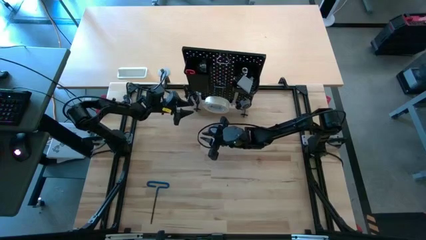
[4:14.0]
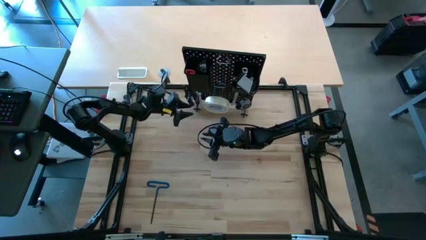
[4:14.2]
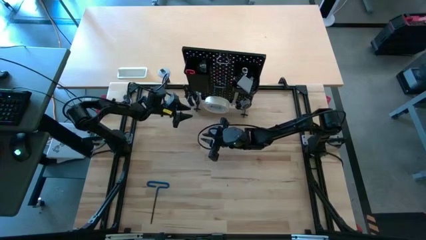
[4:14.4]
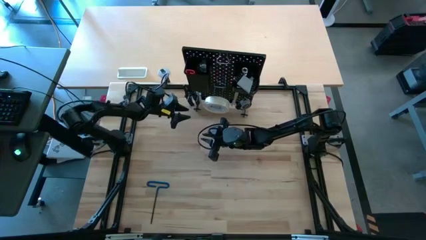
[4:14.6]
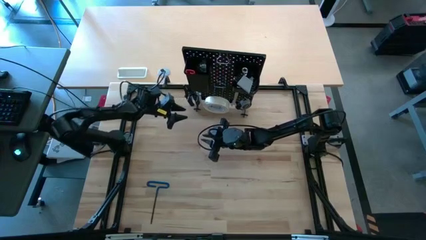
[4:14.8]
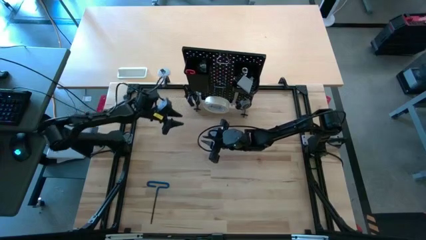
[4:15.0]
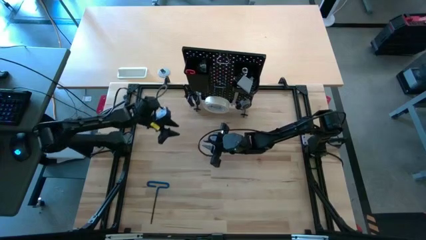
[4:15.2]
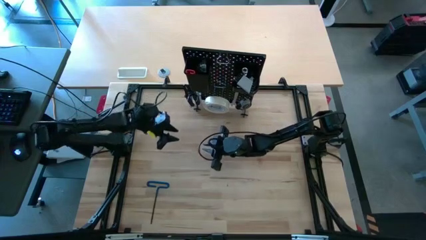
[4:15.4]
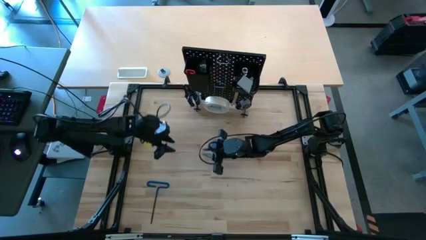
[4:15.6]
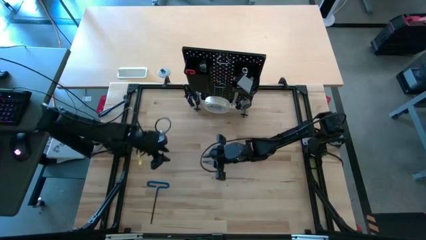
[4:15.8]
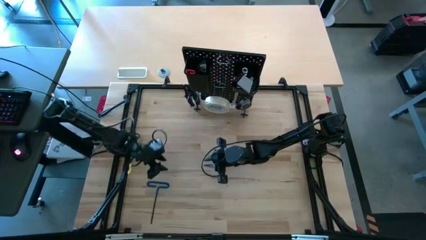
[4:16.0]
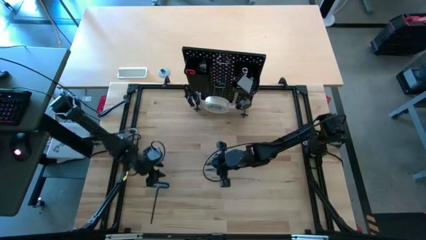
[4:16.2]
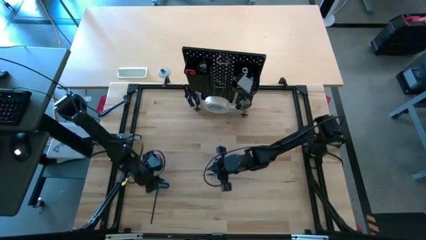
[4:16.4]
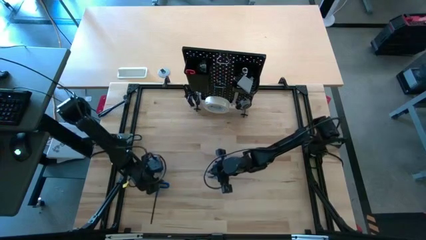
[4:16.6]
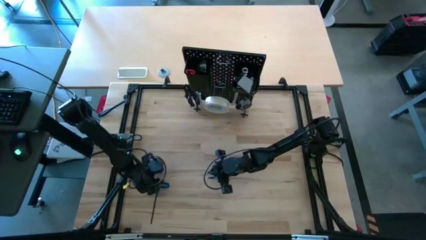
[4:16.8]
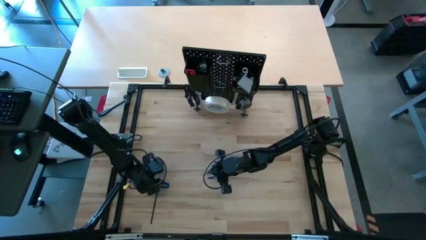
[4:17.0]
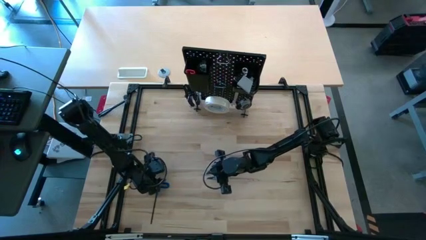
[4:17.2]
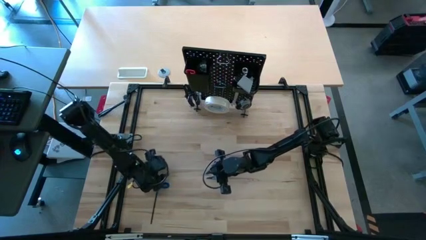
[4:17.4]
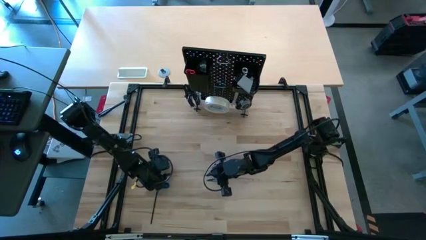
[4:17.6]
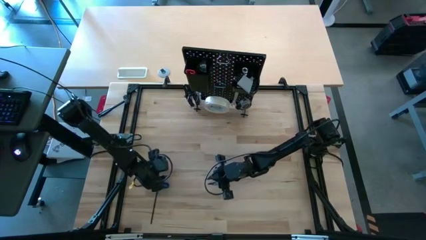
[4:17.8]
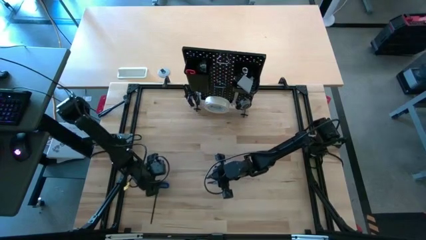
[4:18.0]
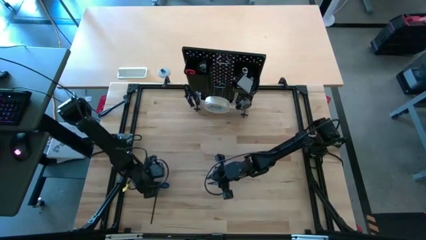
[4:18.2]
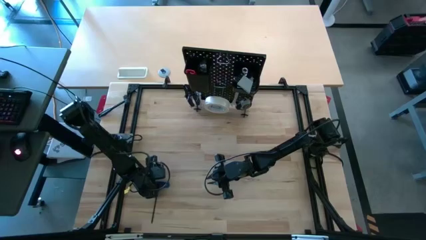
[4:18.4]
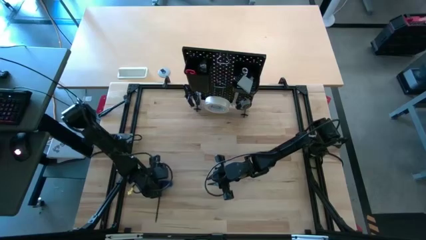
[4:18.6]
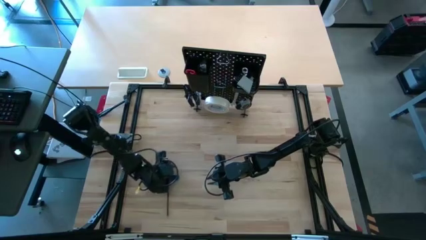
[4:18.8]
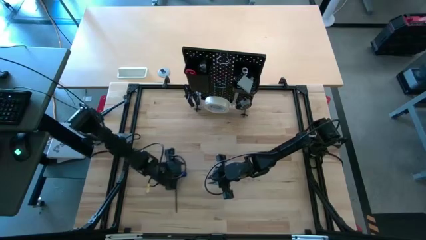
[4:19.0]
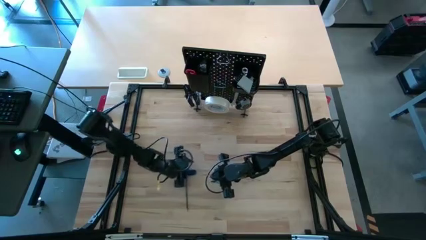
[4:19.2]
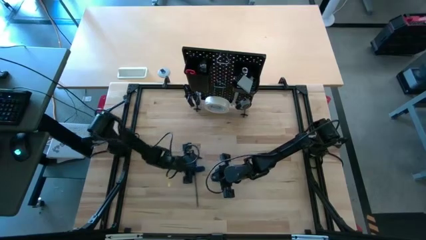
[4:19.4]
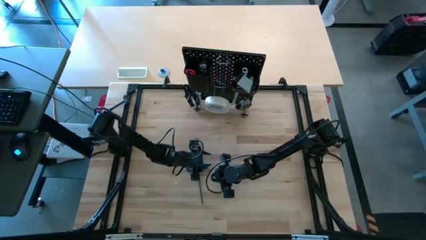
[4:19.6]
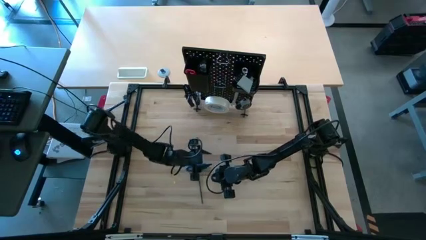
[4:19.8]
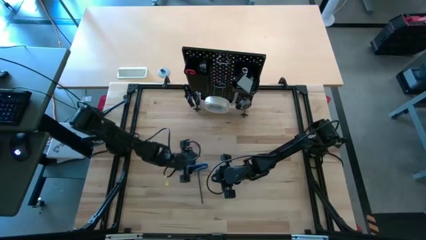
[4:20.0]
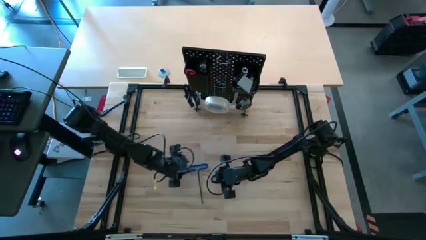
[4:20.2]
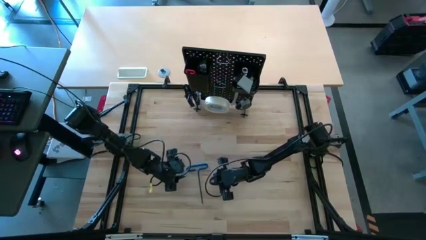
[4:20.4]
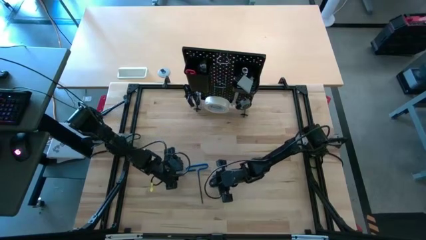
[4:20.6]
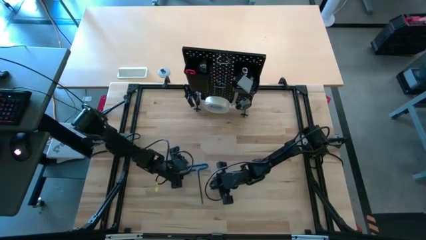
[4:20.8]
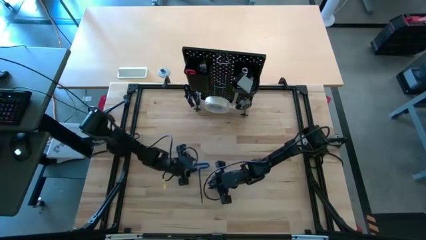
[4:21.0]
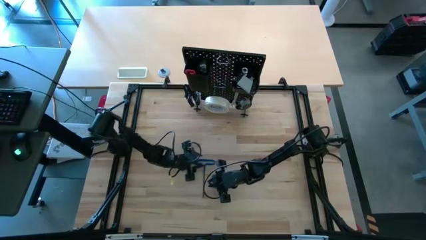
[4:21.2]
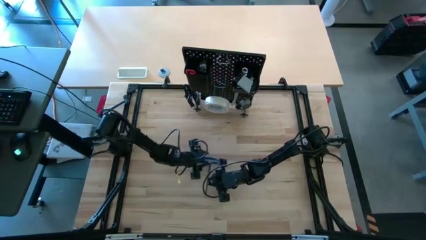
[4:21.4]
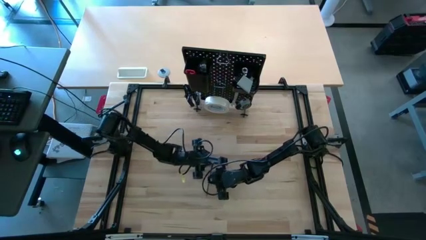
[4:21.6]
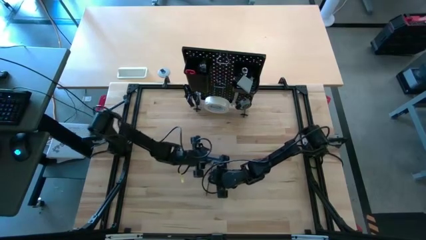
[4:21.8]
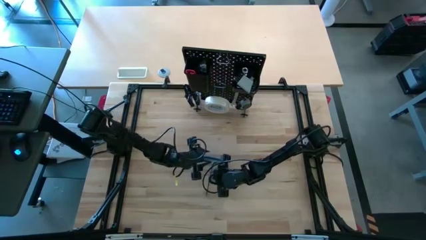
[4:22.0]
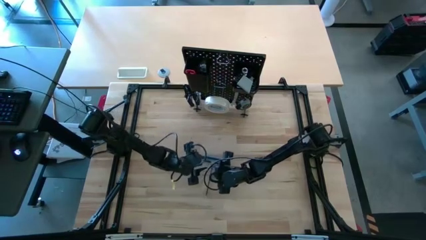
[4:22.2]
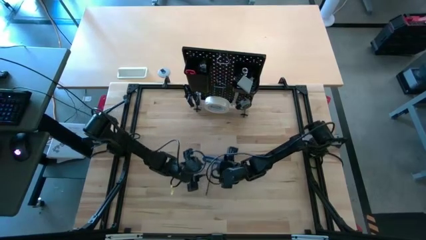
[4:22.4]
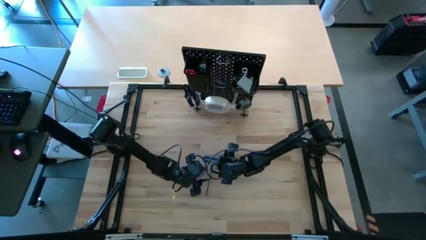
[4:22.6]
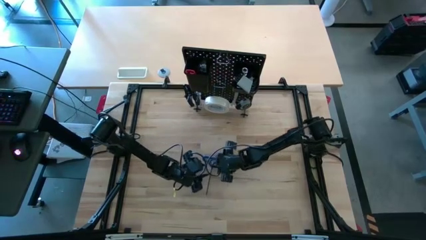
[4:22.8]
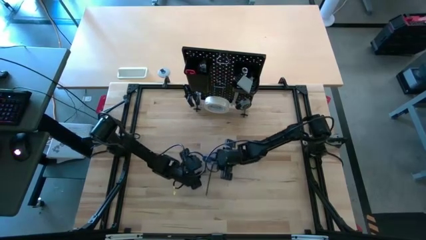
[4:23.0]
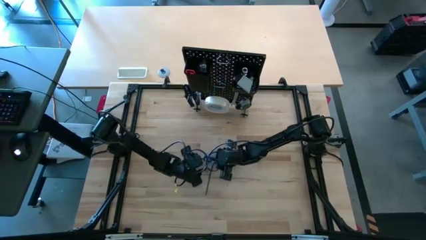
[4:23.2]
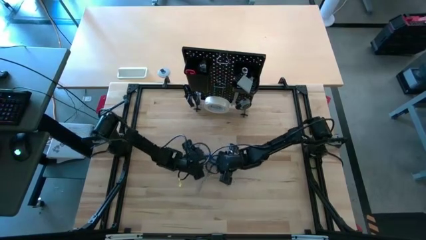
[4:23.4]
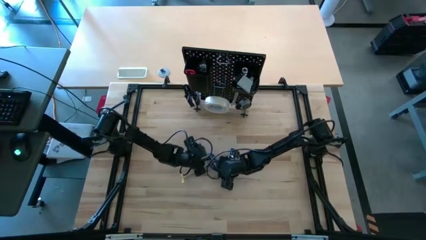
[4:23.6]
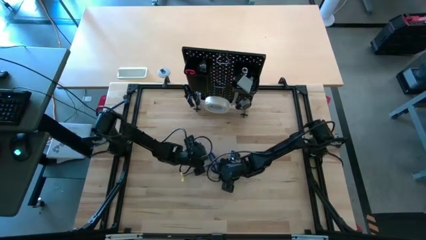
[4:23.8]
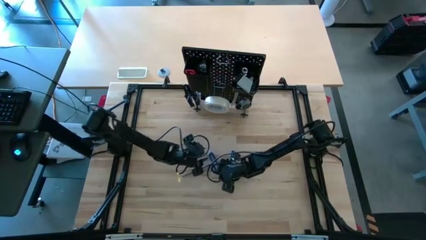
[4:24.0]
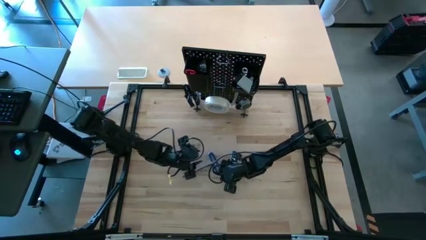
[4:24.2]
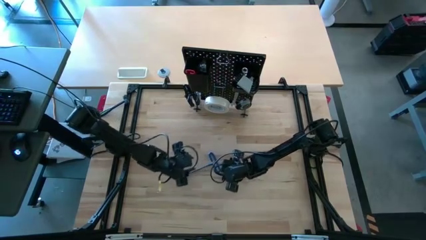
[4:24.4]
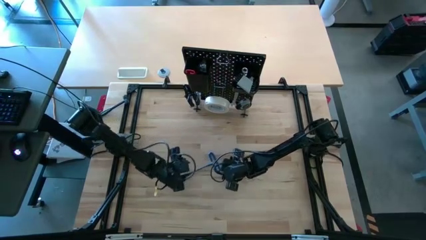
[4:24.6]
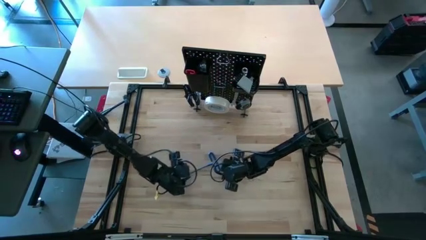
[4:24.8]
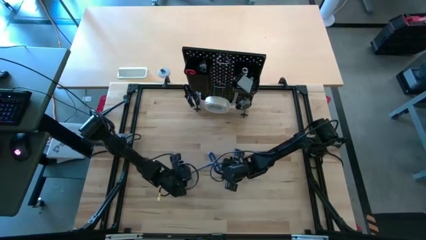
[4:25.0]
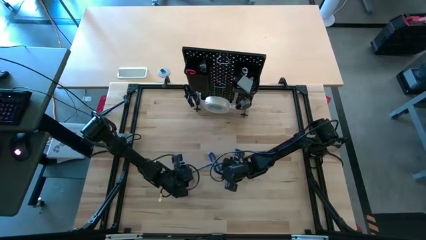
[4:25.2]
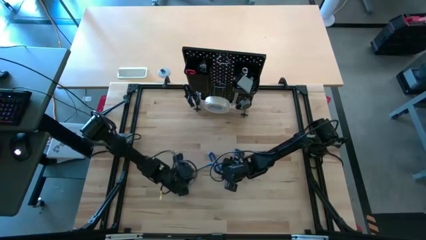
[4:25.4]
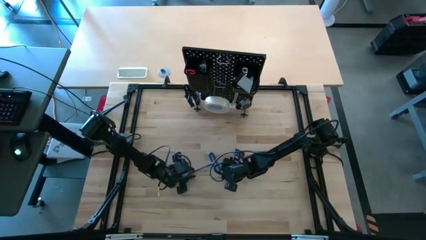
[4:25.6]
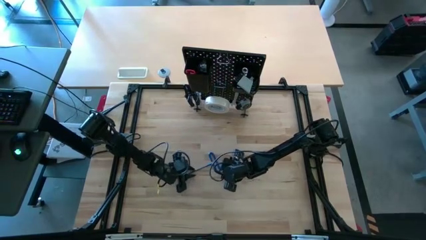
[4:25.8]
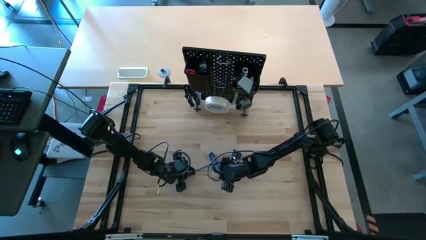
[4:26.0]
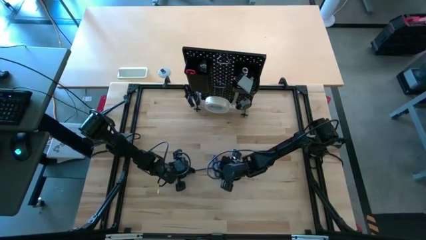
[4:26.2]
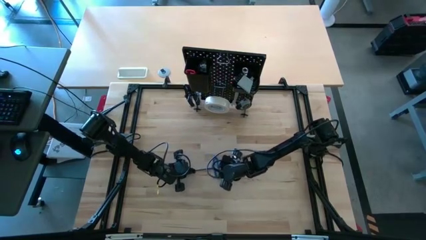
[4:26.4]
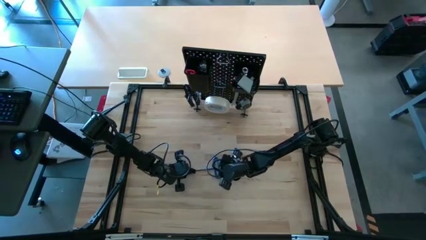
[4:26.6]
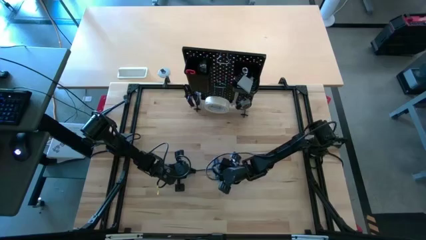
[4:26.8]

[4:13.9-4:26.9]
Task: Hang tools onto peg board
Hang the blue allen wrench on the pegboard

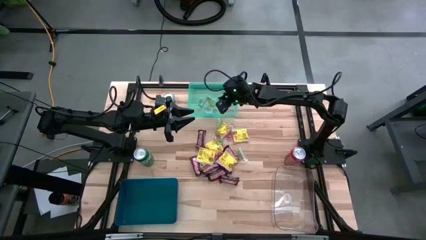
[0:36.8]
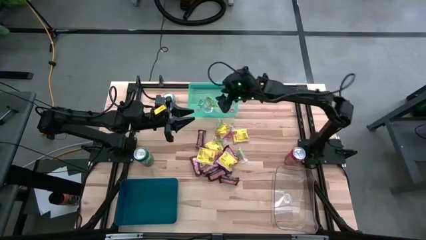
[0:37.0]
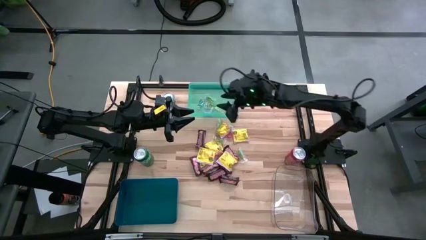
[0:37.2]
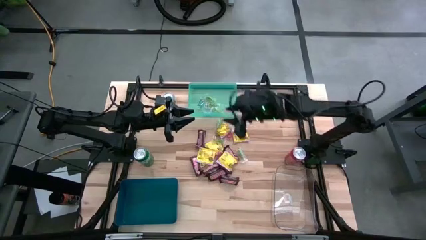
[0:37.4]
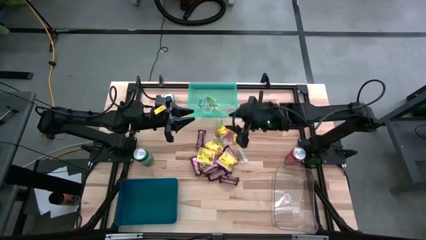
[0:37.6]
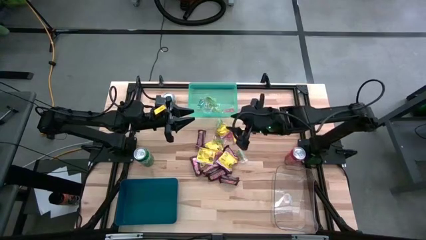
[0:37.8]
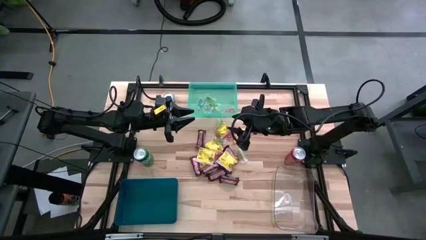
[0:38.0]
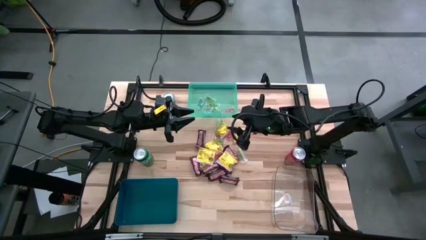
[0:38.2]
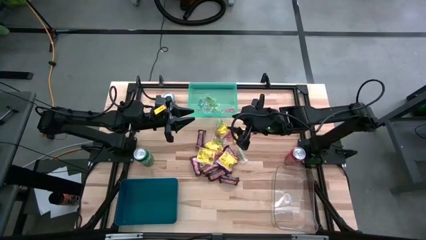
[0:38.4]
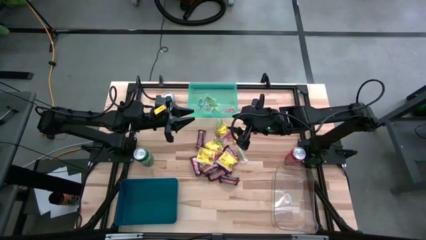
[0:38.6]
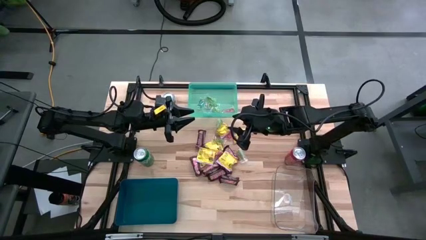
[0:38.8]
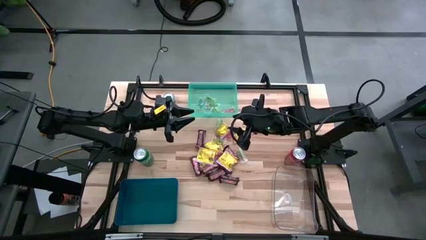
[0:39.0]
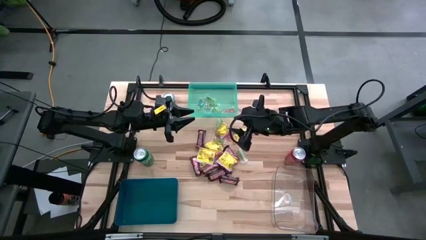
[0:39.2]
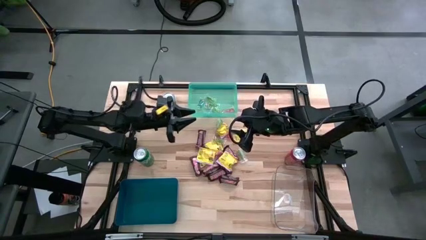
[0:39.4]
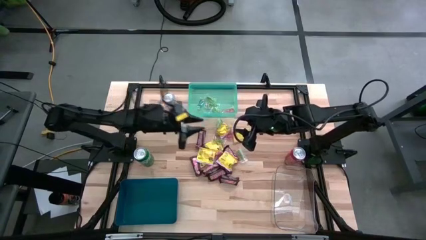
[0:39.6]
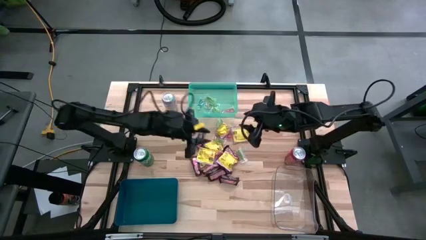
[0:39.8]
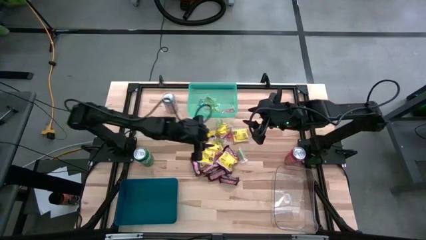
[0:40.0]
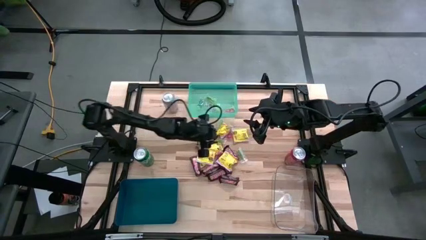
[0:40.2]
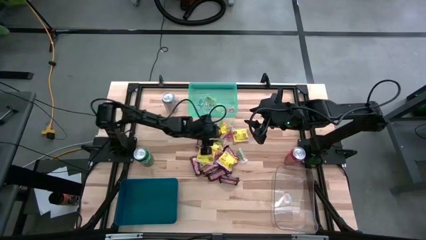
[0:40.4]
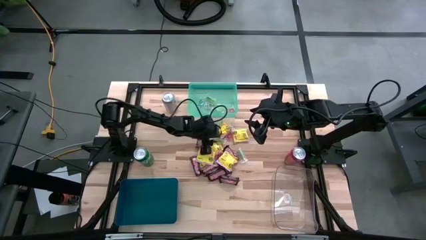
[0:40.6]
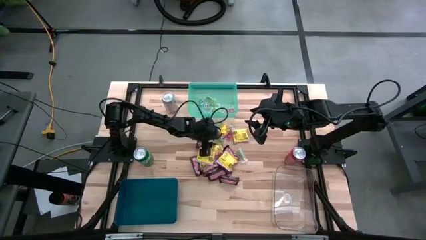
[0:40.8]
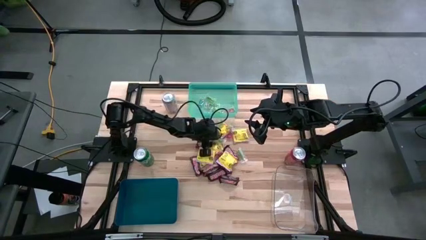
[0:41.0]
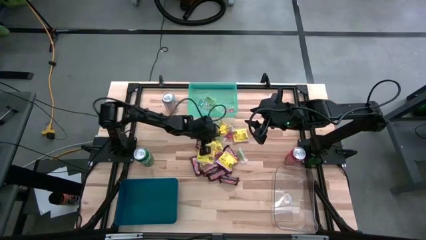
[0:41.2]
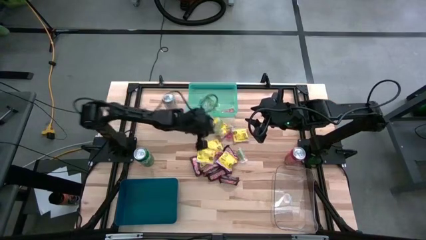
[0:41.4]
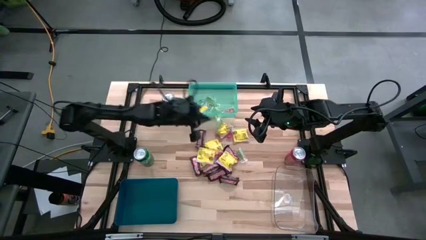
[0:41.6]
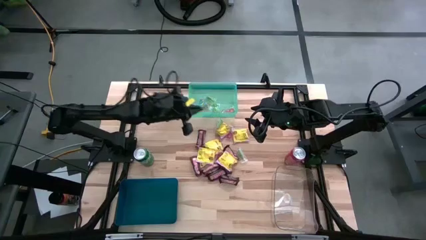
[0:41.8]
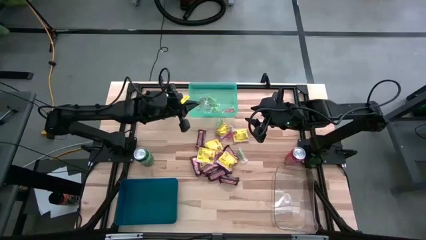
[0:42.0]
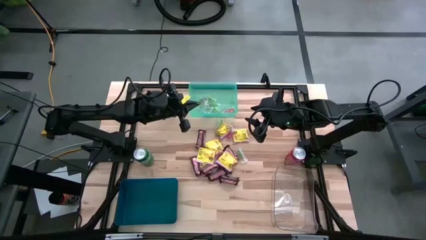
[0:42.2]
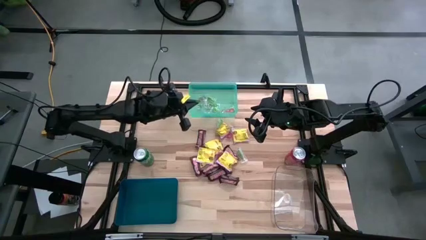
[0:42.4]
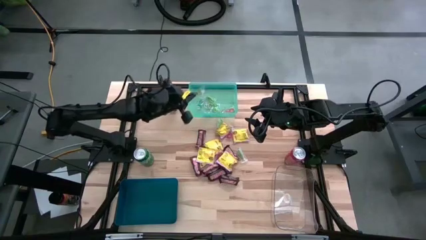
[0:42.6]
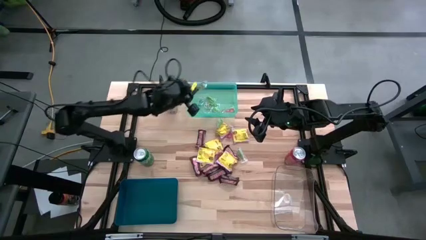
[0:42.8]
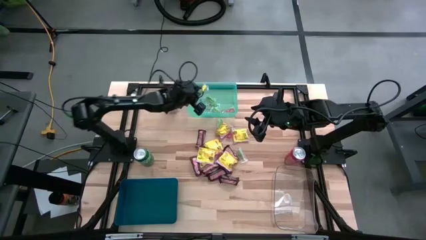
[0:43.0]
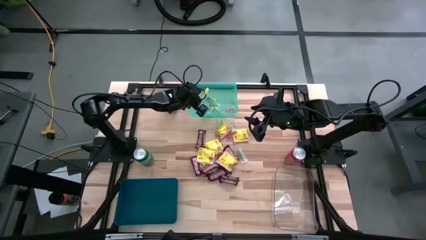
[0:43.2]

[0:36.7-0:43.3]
Task: Sort candy
Put the green gummy into the light blue bin
